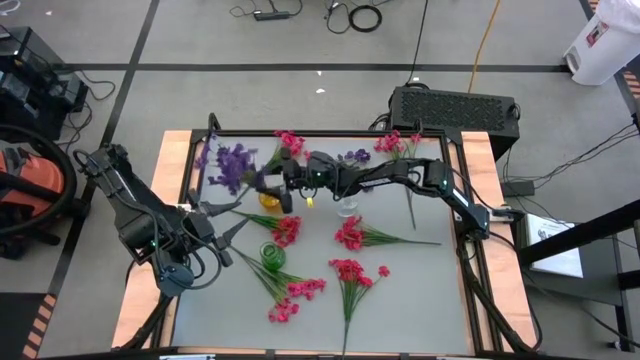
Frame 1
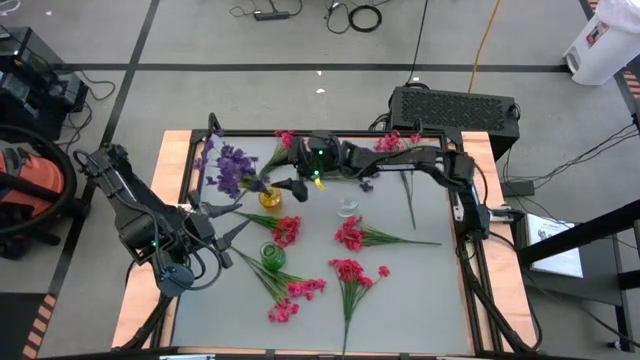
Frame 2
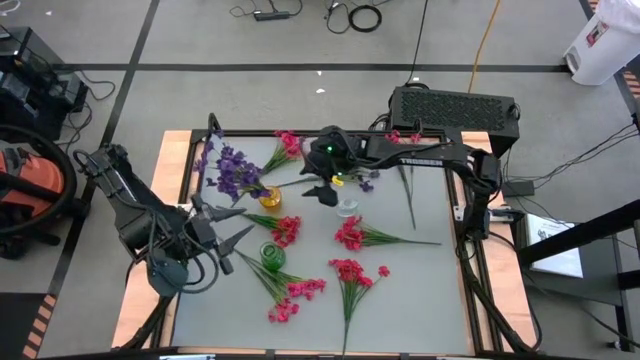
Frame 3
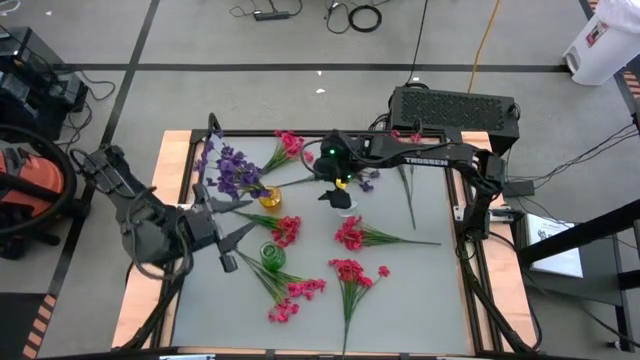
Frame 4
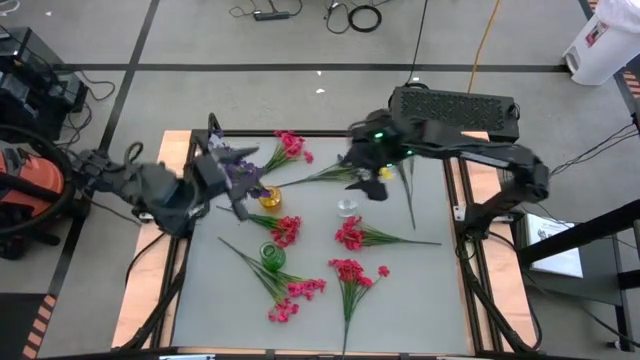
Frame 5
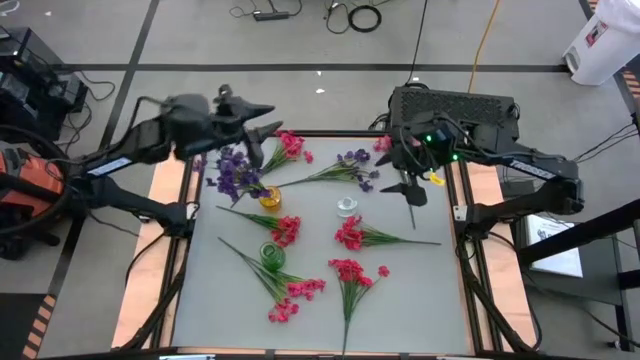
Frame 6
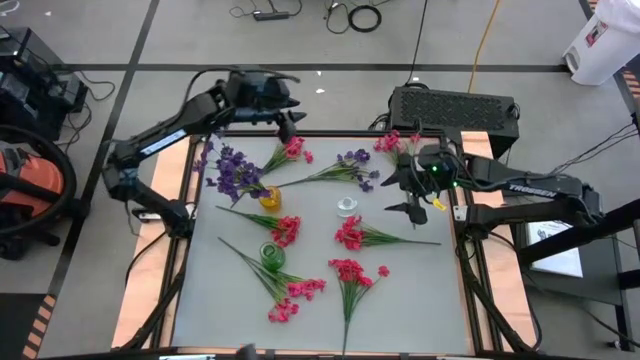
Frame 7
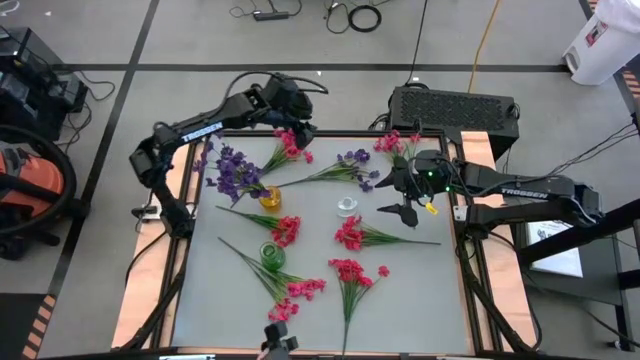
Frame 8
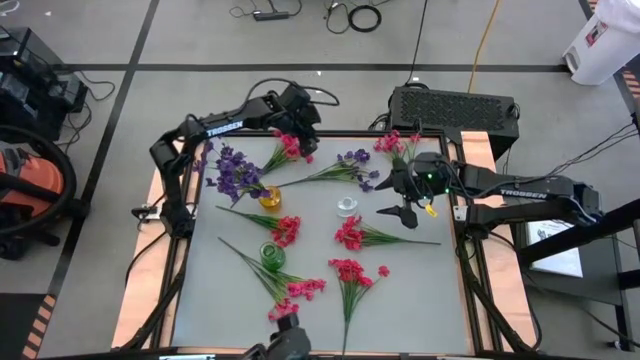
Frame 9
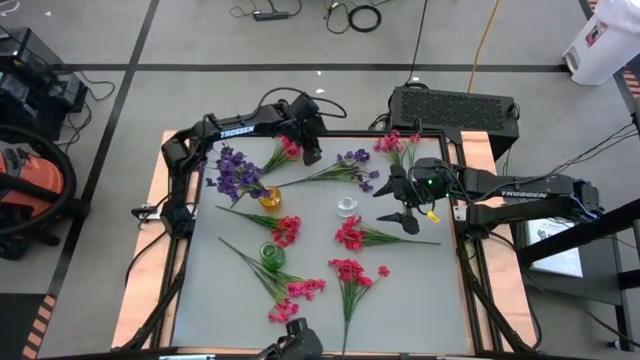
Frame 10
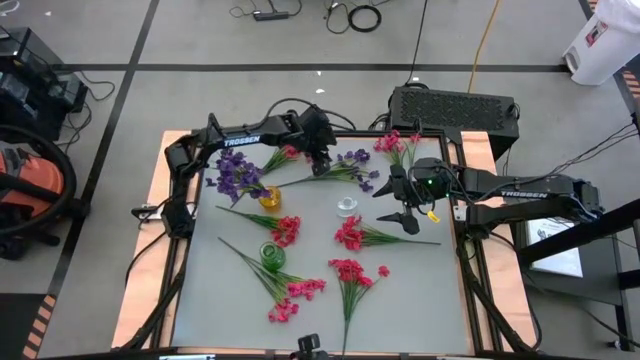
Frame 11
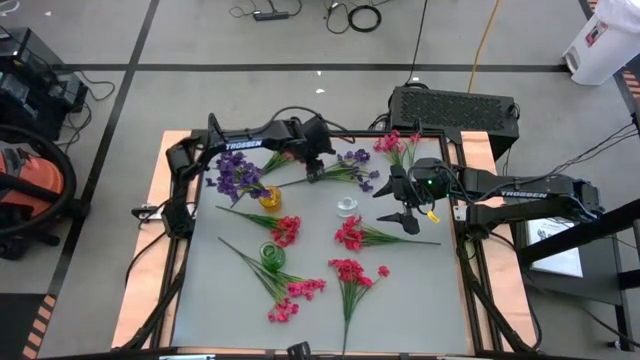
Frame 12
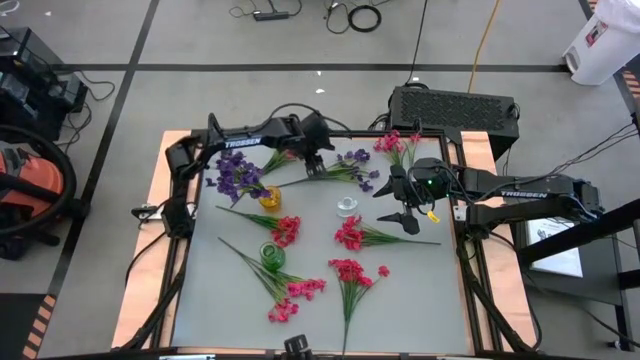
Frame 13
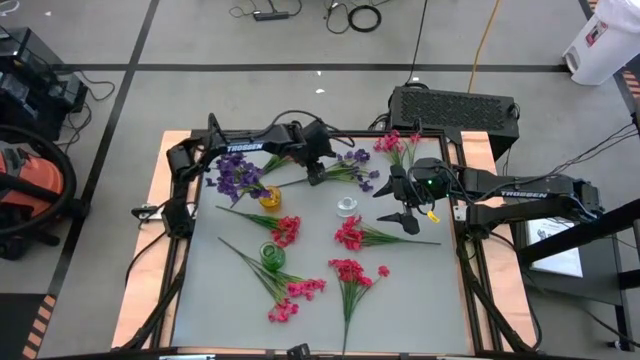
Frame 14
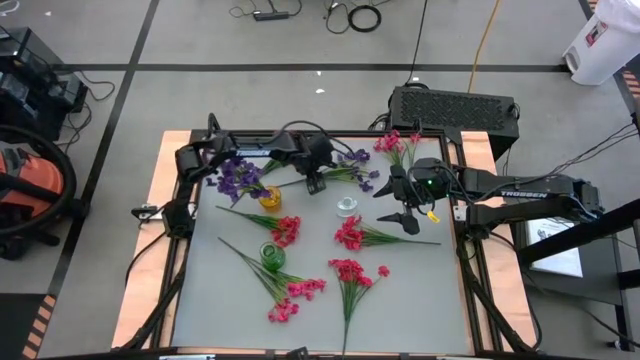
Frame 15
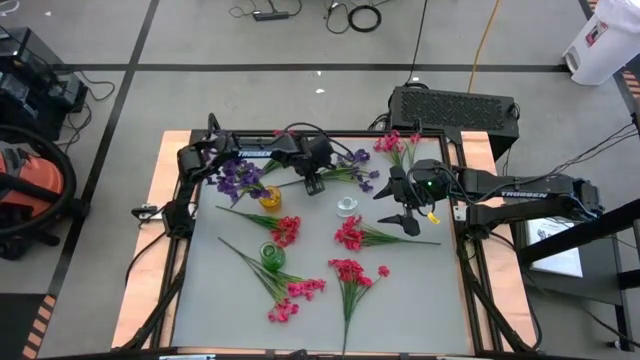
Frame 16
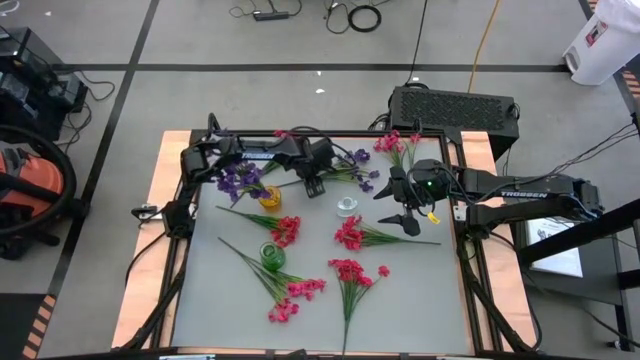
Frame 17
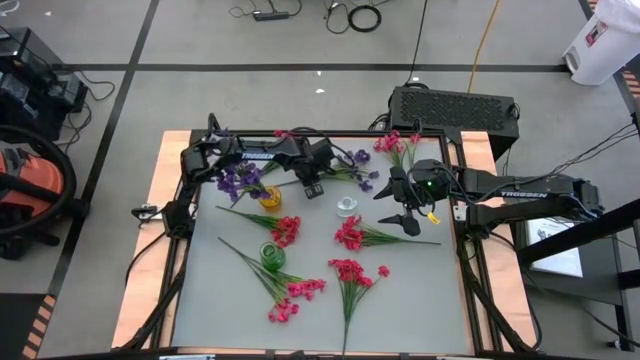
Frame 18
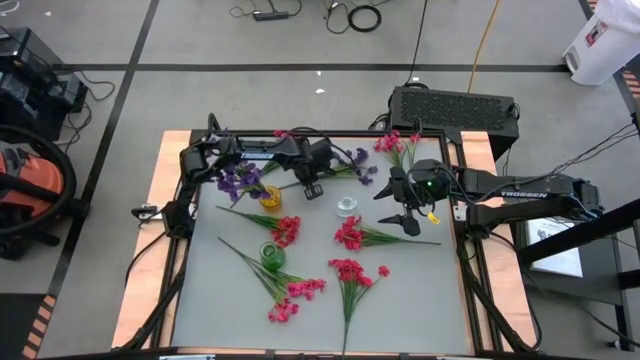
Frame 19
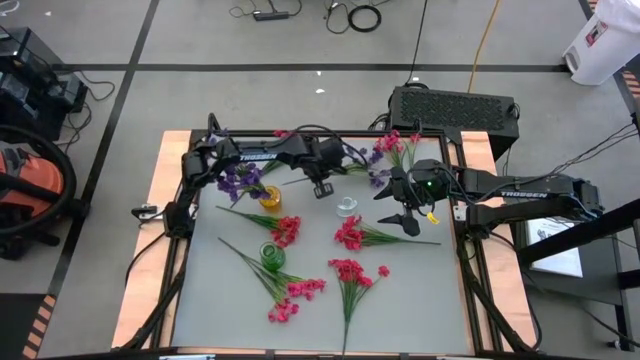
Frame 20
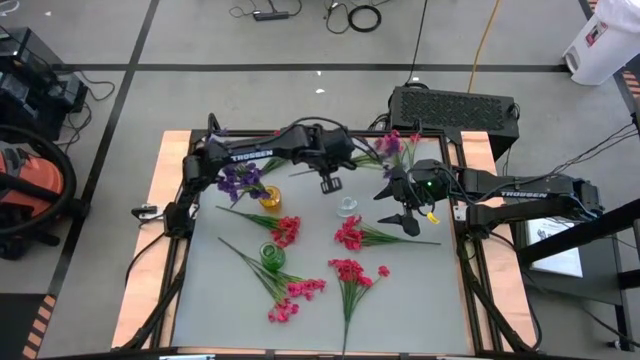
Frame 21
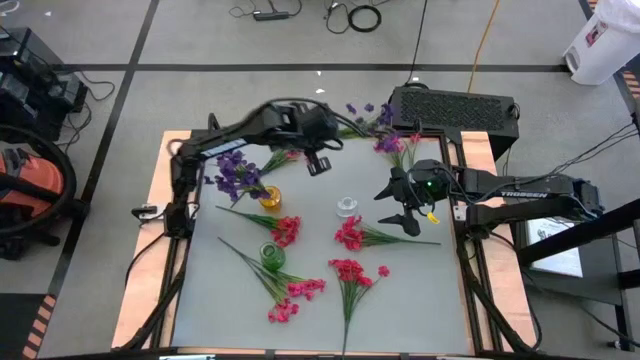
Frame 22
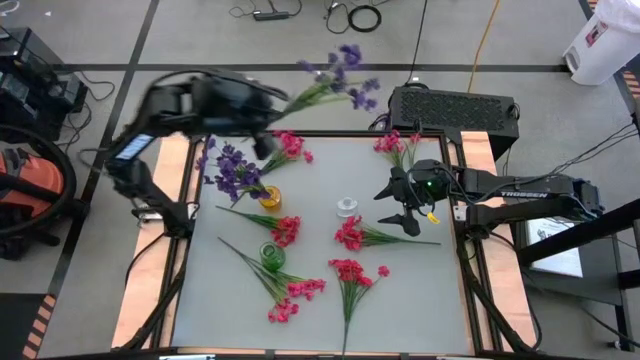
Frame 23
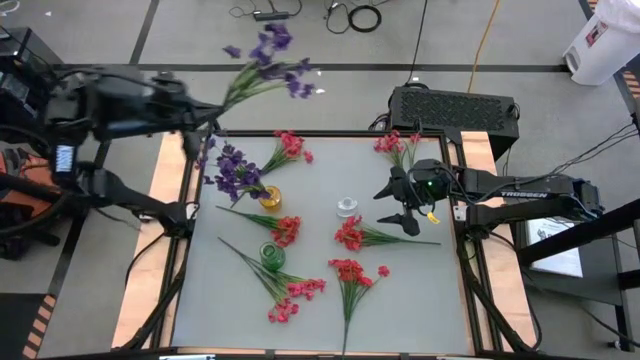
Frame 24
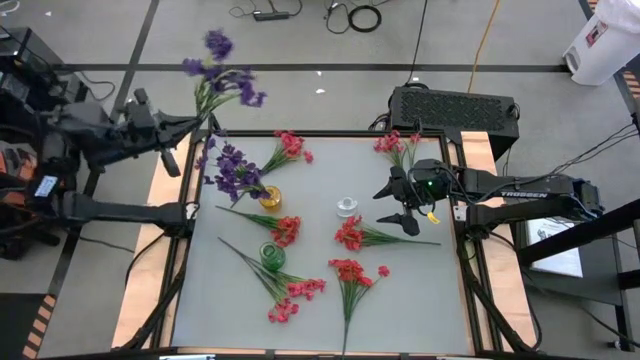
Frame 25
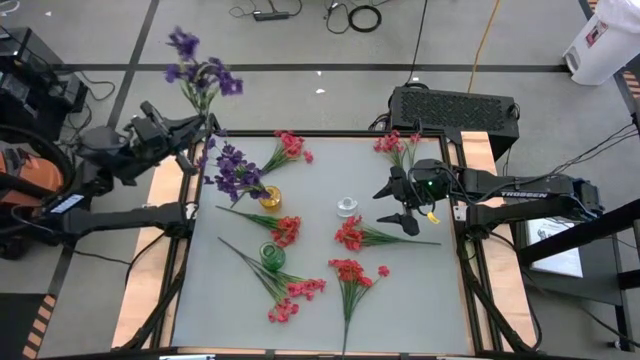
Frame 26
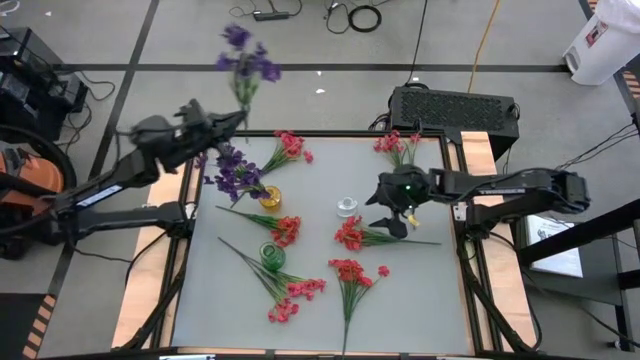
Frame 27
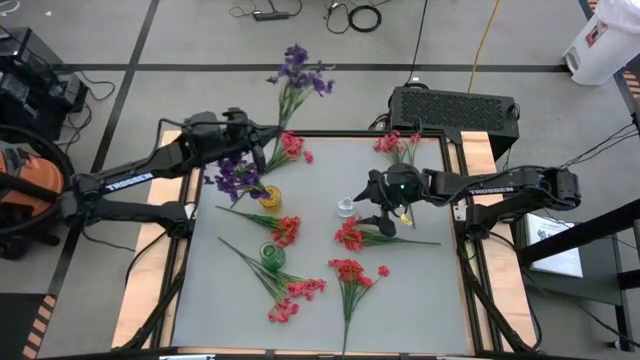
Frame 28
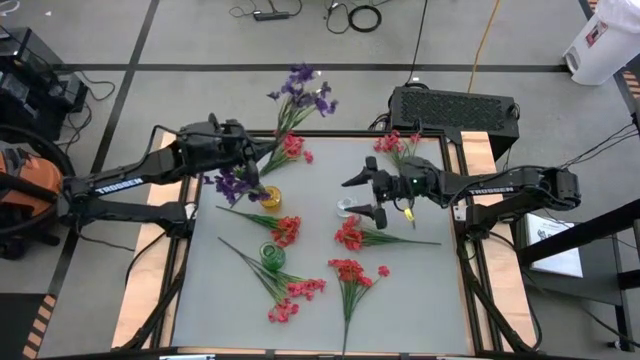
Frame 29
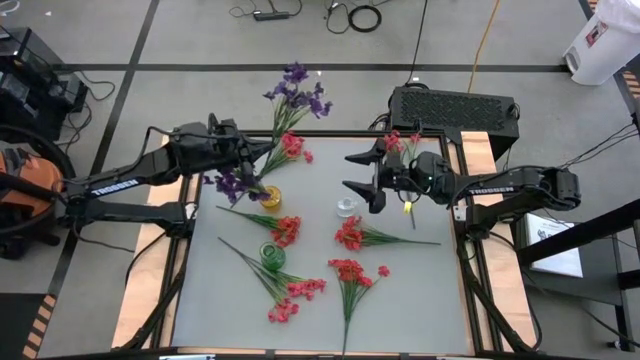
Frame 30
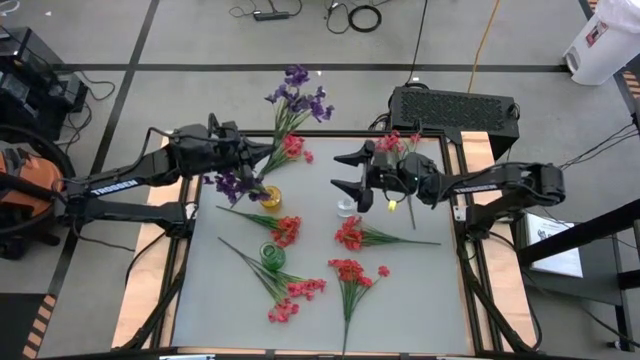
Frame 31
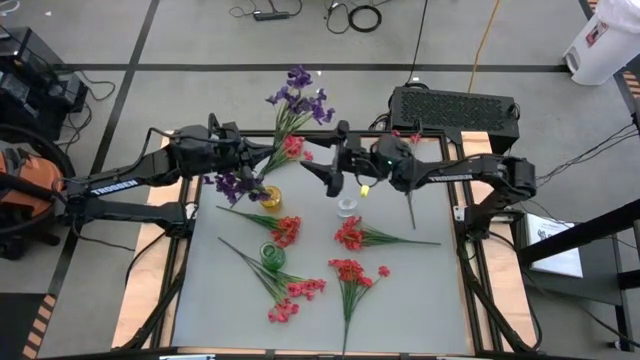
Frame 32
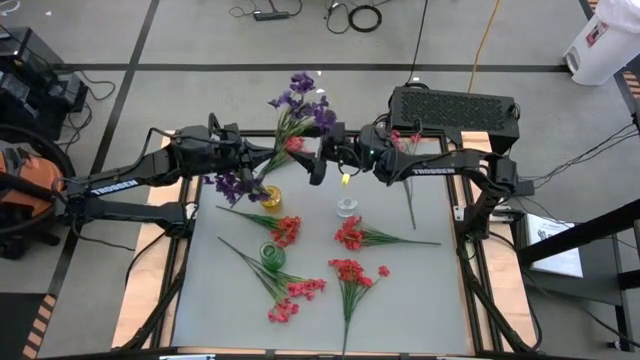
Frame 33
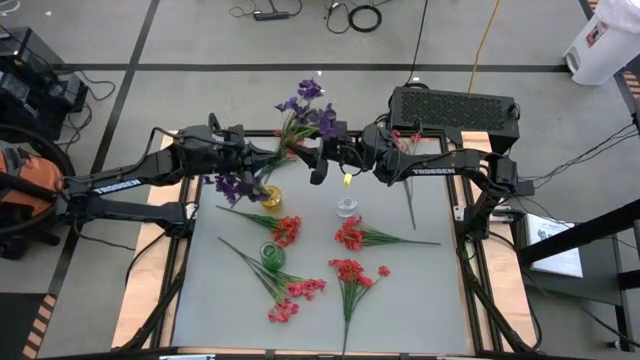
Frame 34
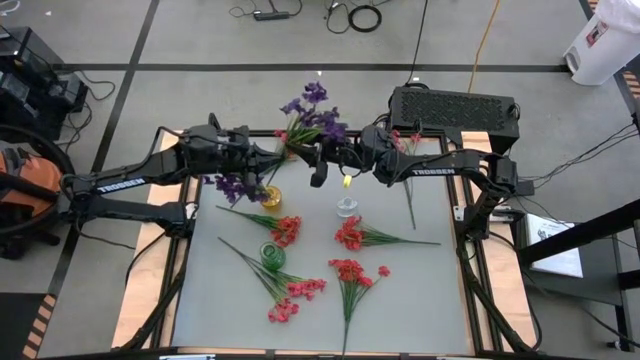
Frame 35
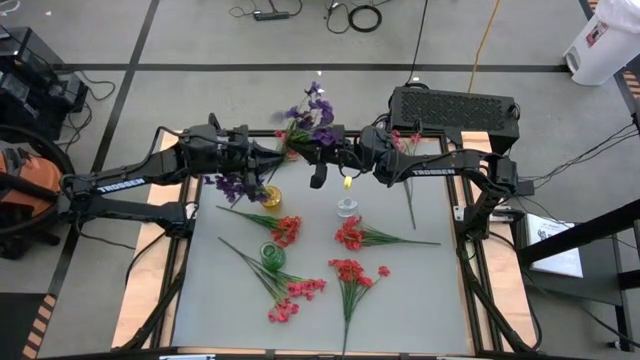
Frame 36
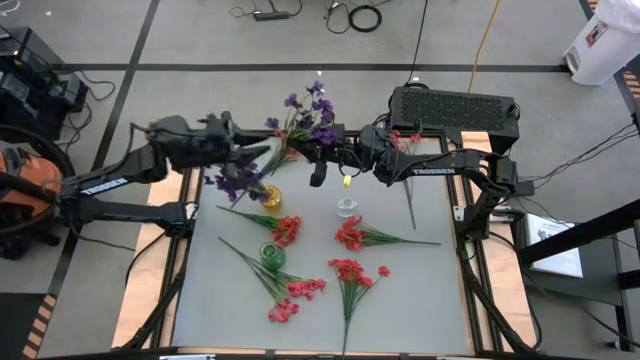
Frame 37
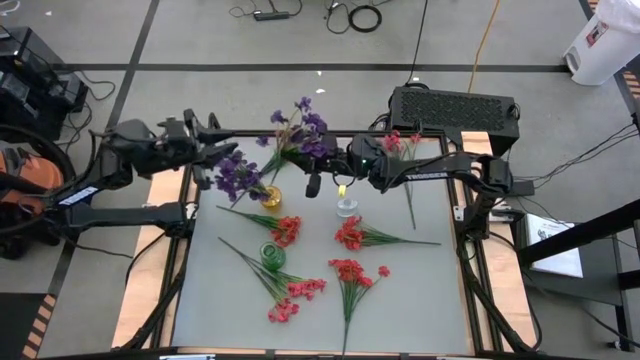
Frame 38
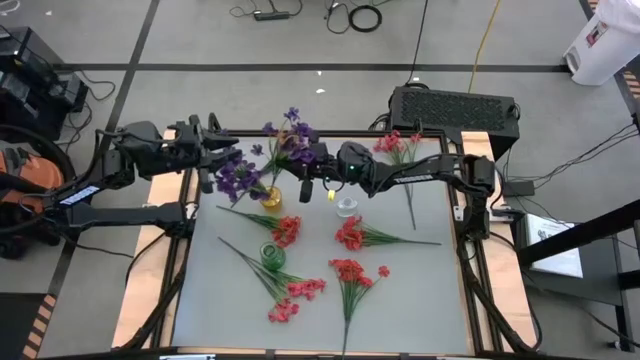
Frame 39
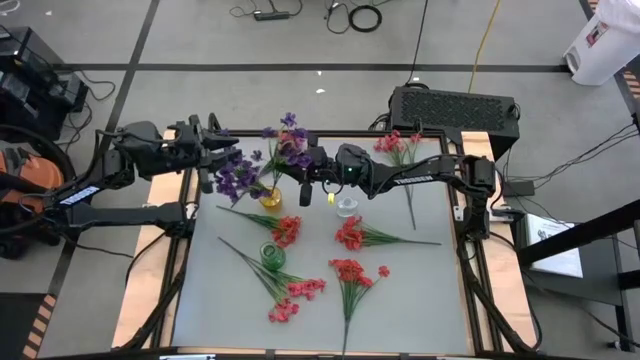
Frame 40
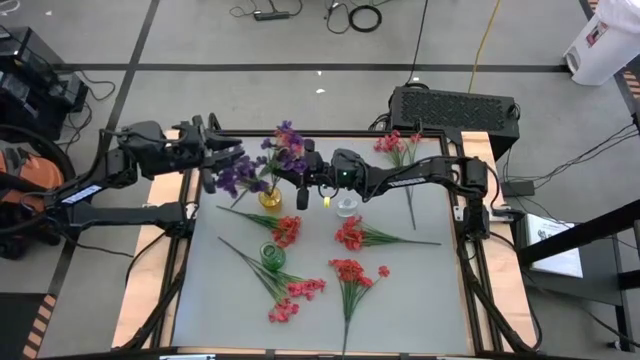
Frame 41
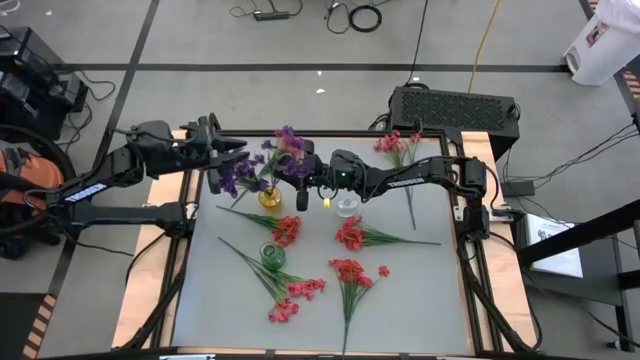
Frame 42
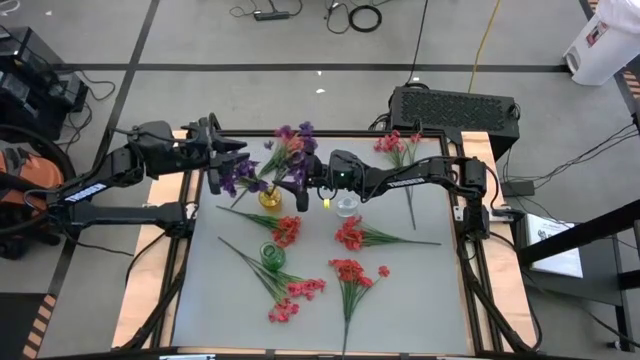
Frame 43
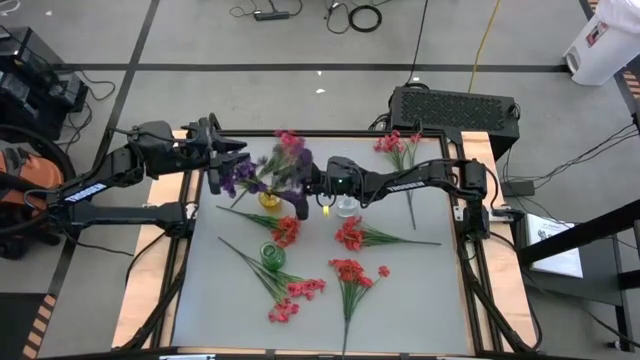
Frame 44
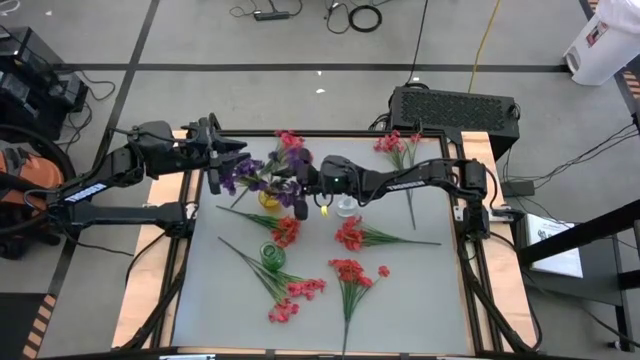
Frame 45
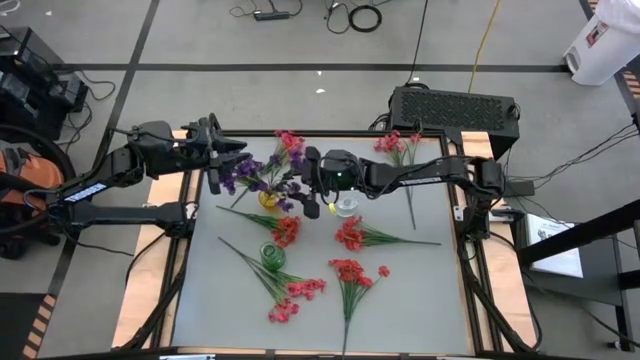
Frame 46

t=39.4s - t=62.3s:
Task: Sort flowers into vase by color
Put the violet flowers into the yellow vase
